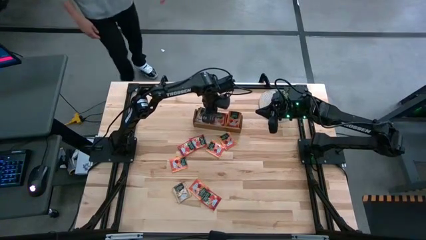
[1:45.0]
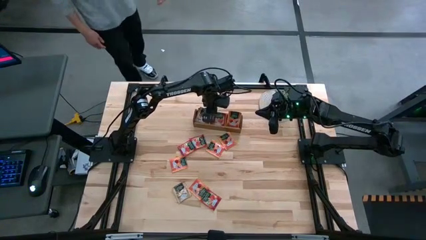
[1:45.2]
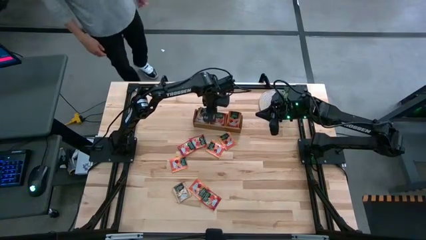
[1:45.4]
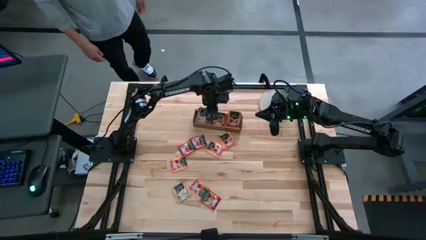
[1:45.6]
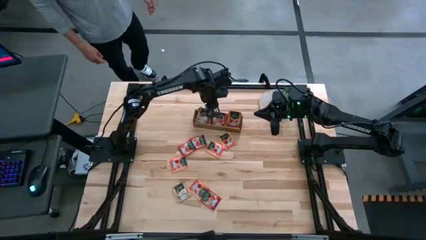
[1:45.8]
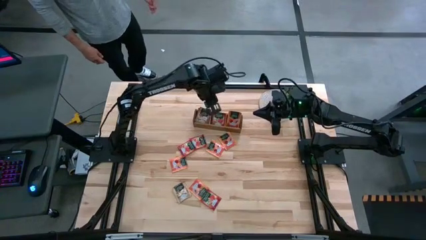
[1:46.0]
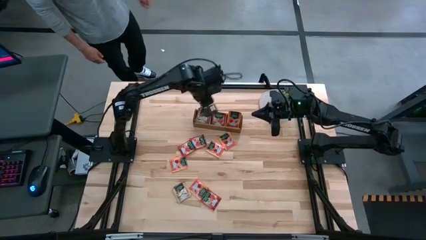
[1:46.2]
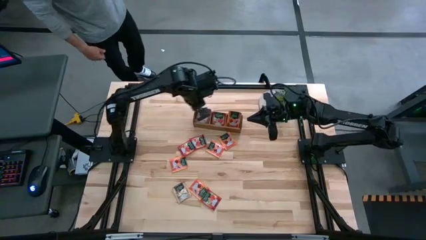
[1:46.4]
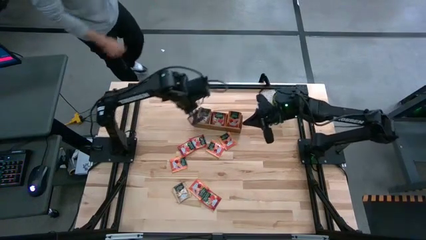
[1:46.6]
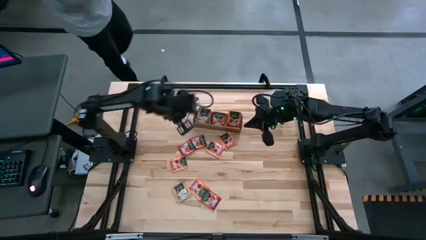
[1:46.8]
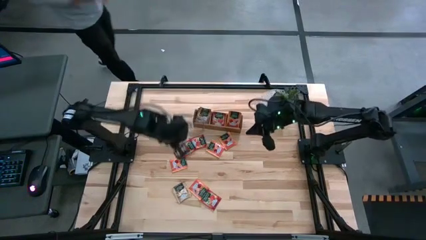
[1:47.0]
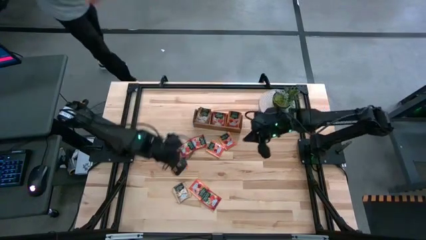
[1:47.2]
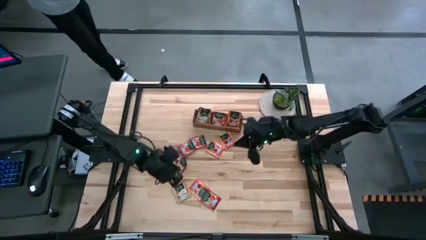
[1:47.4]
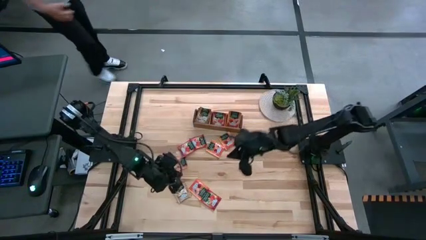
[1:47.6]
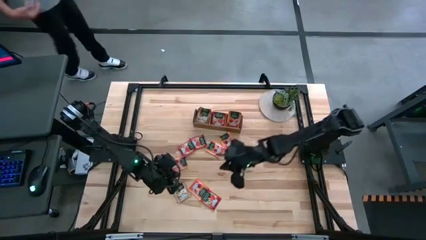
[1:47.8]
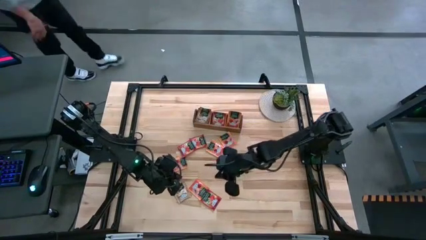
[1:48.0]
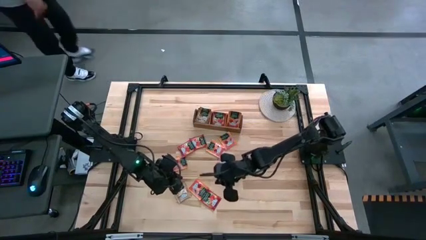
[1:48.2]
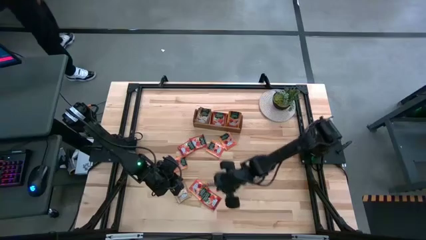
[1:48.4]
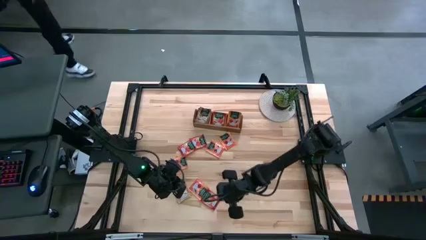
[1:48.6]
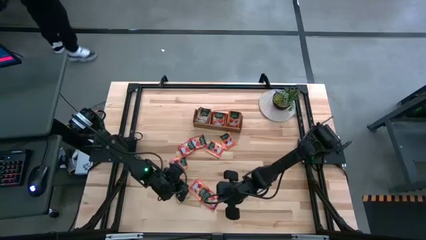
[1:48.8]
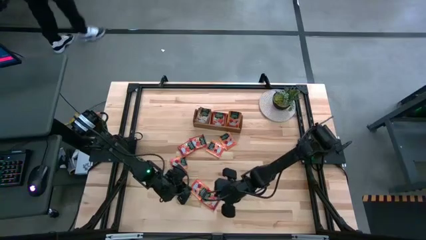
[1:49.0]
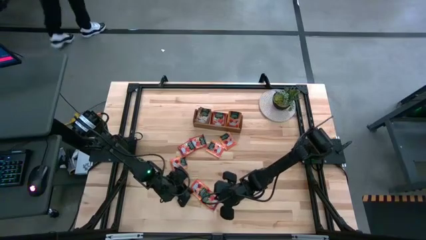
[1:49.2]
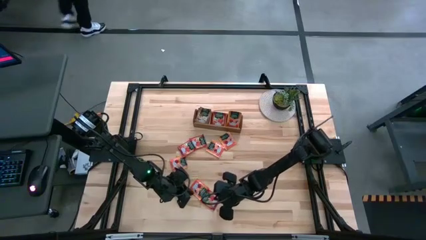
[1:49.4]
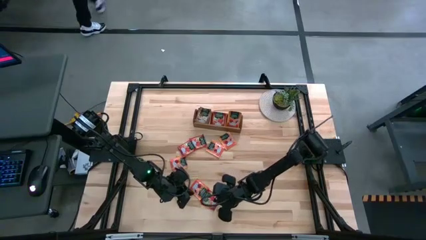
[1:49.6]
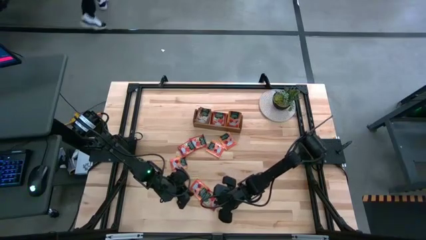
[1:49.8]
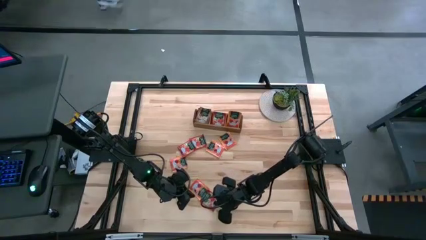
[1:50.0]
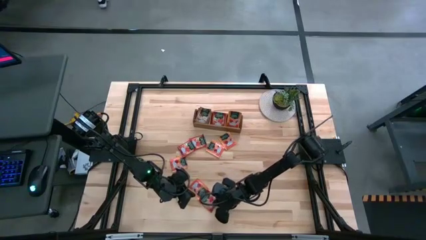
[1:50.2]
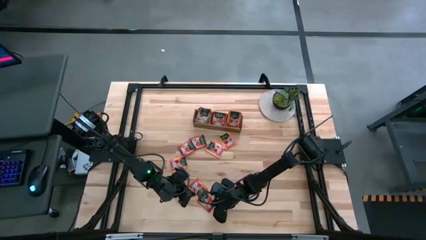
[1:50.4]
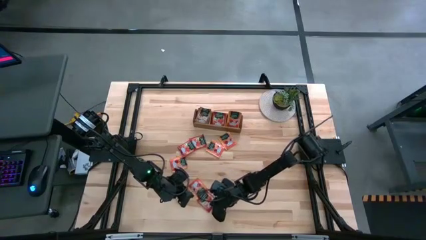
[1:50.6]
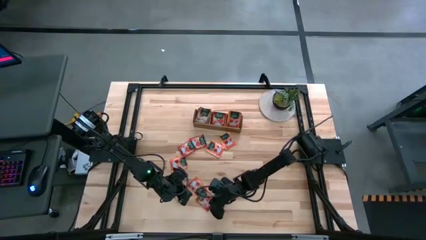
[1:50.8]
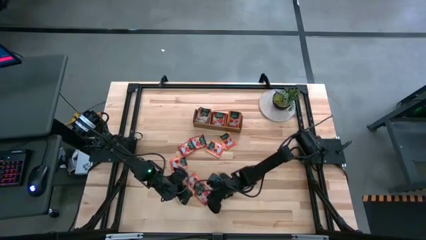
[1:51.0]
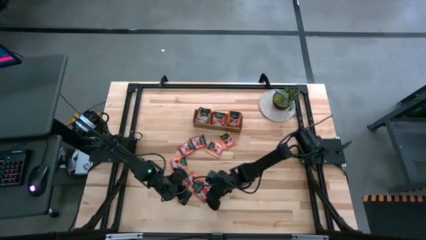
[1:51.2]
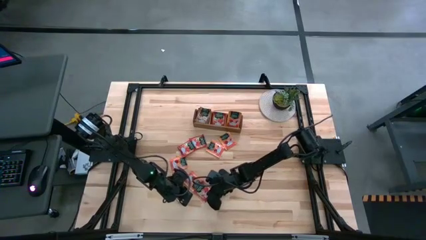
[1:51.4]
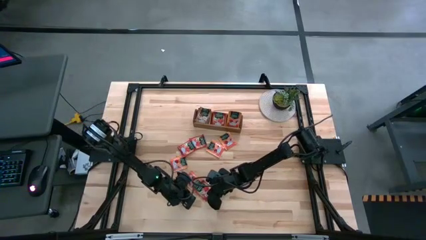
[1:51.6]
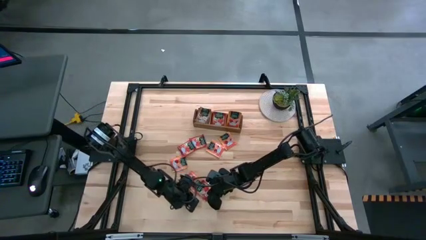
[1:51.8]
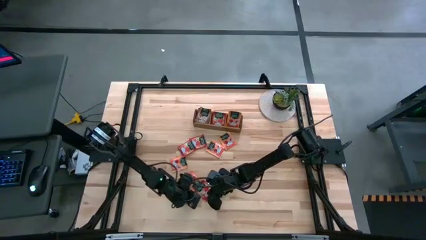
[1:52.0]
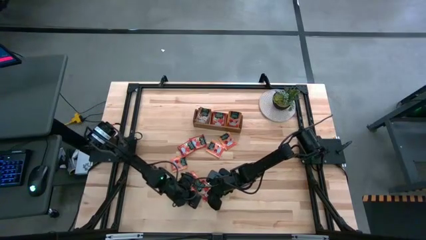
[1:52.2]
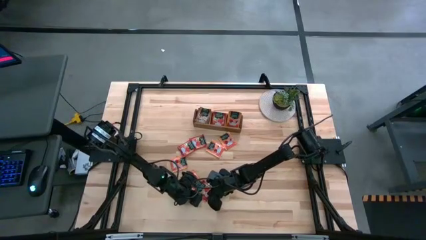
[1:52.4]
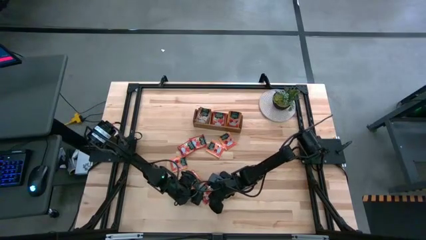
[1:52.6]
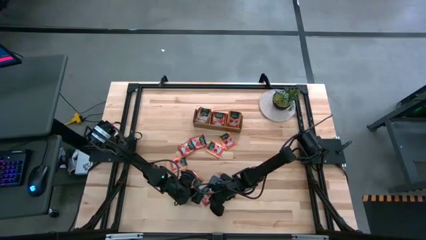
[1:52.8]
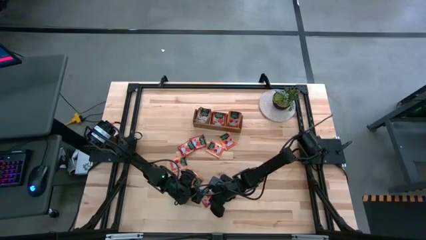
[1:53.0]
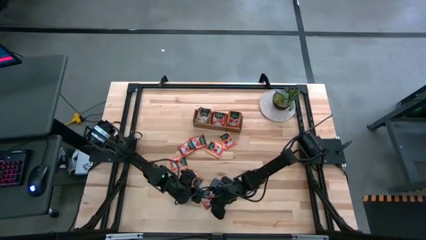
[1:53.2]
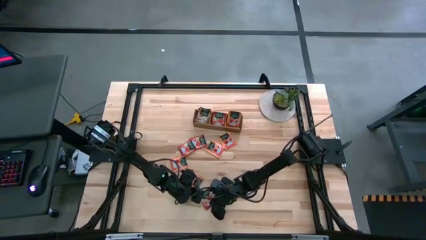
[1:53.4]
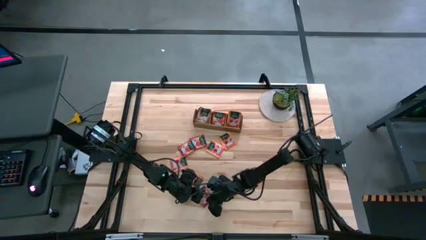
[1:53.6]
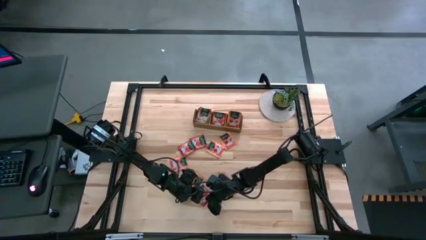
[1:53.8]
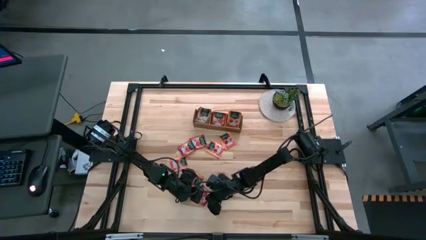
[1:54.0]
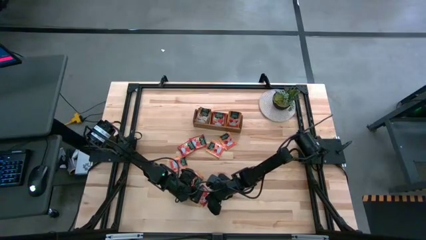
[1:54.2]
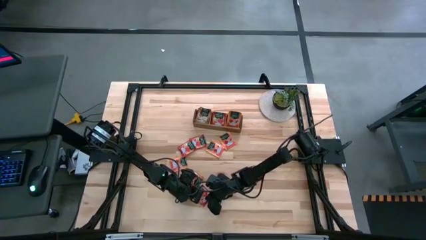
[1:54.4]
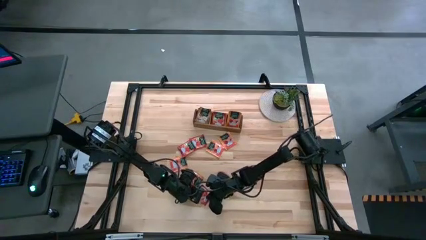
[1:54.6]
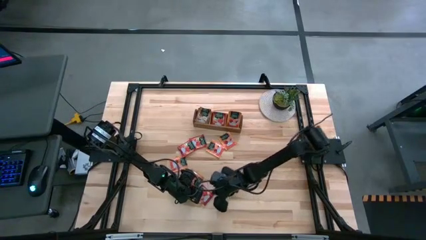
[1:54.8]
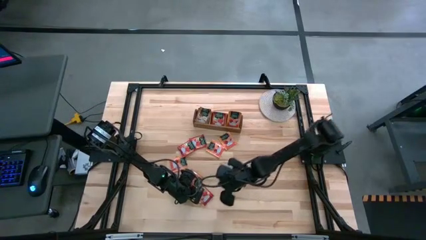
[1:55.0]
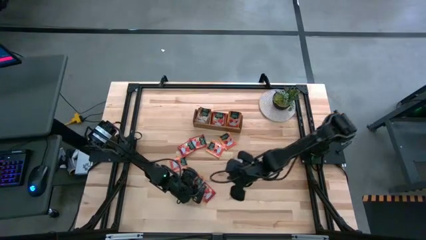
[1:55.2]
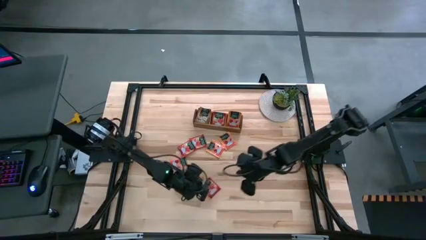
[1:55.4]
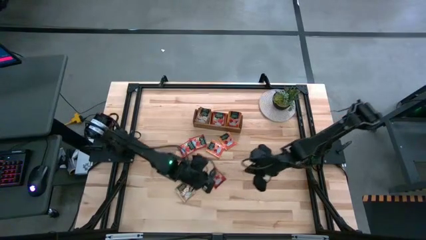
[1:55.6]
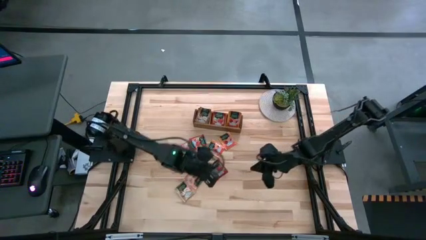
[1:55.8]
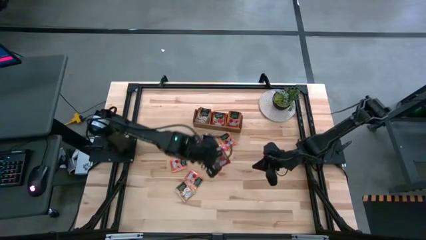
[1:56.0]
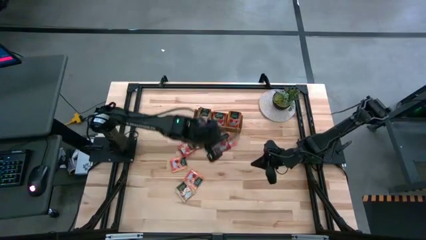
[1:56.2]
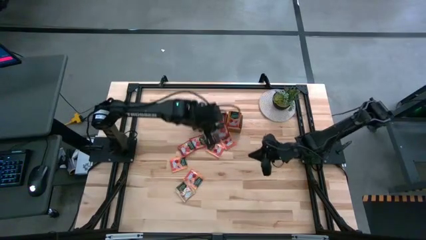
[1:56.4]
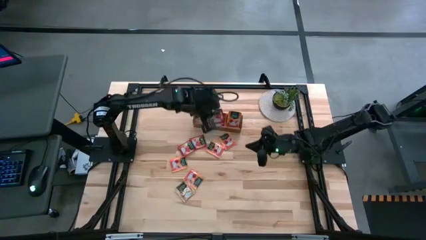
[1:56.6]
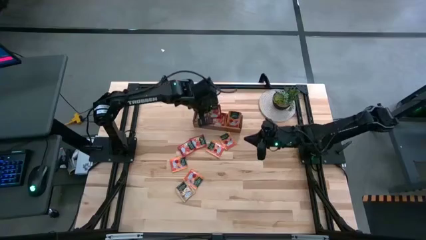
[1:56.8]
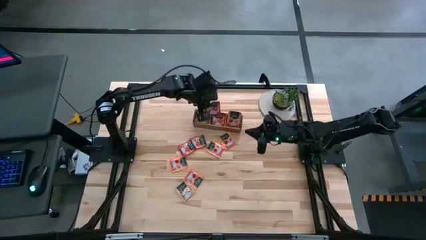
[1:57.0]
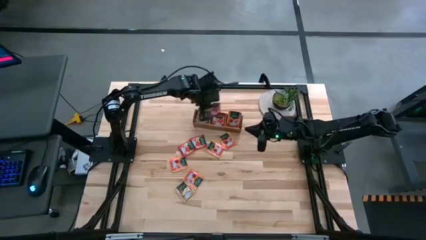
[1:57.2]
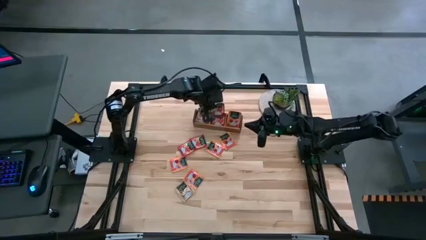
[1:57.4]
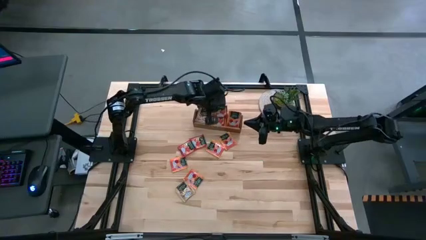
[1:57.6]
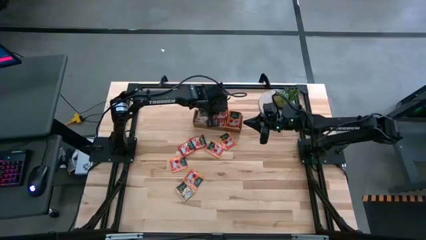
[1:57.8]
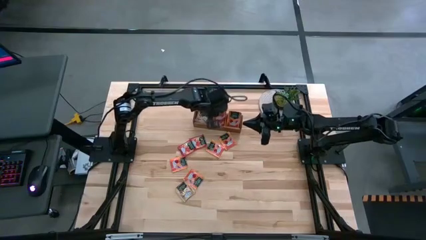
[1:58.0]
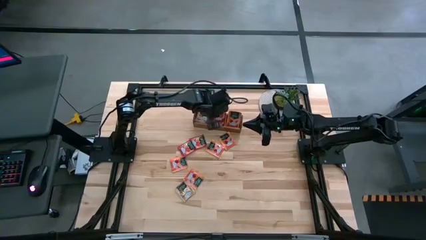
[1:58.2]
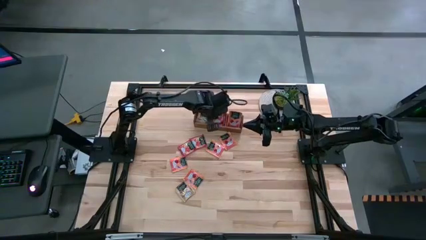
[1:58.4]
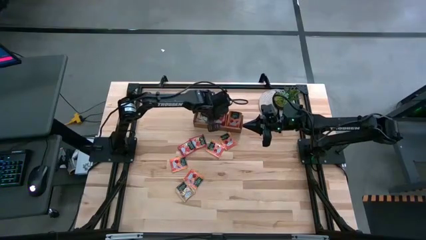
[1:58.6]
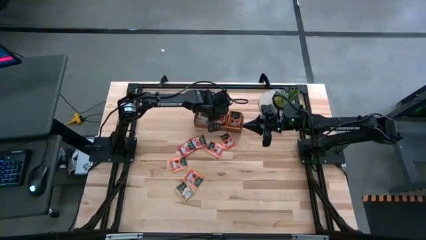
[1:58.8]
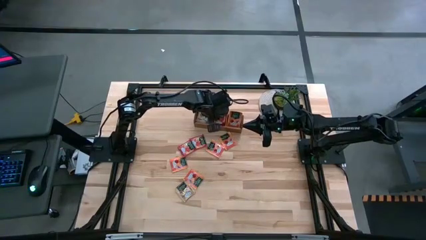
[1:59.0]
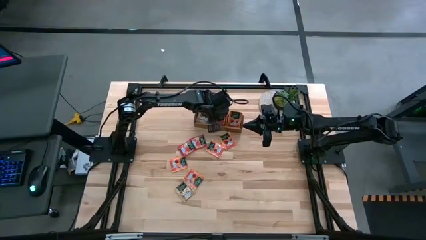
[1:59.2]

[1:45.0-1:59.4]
Task: Pick & Place Tea
Put the red tea bag into the middle section of the wooden organizer

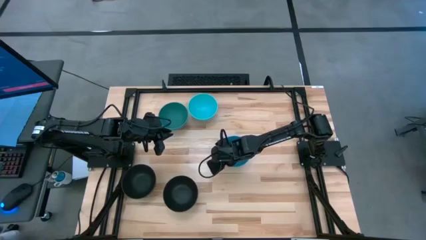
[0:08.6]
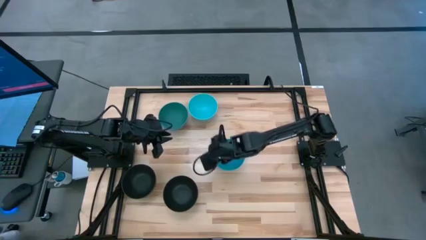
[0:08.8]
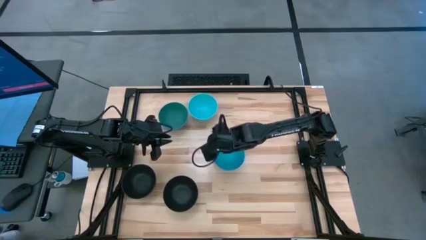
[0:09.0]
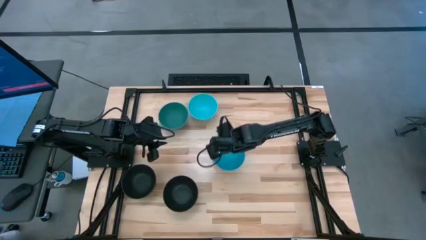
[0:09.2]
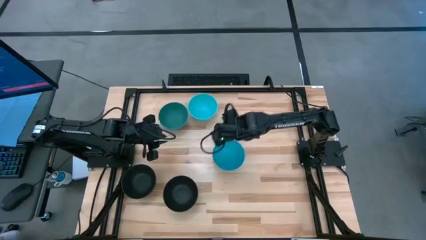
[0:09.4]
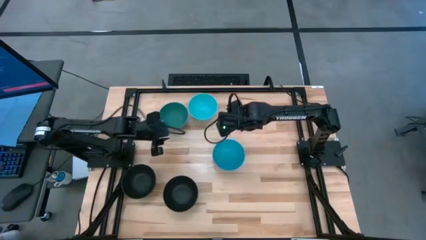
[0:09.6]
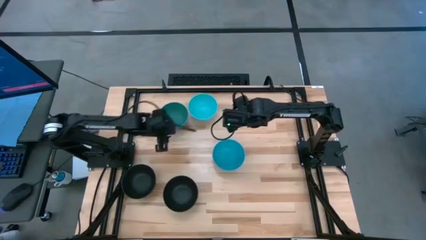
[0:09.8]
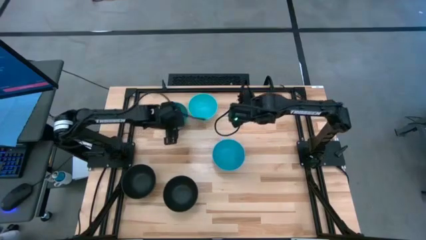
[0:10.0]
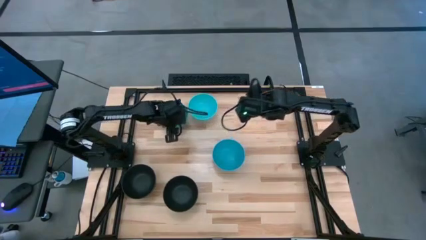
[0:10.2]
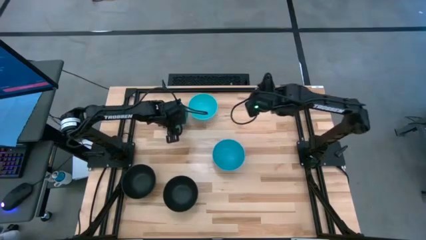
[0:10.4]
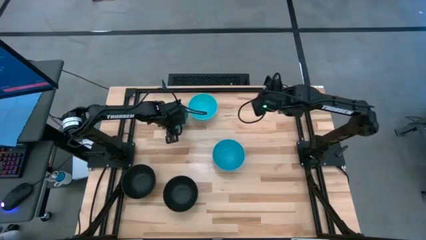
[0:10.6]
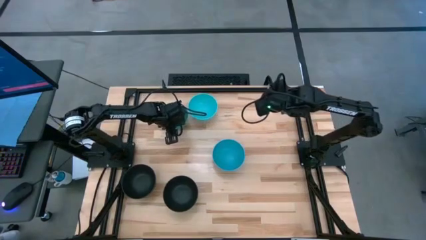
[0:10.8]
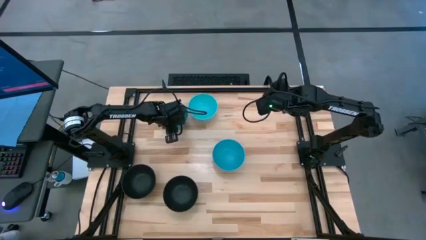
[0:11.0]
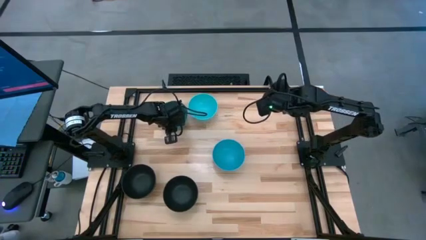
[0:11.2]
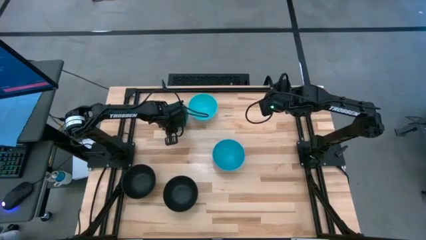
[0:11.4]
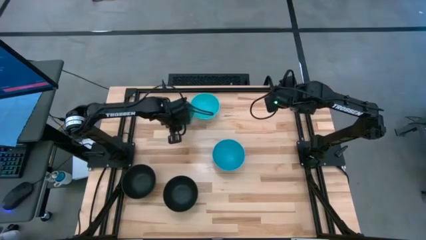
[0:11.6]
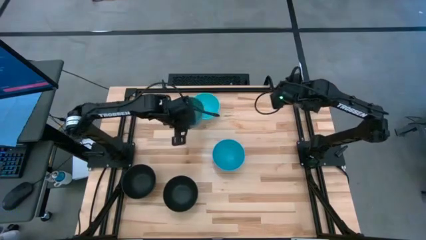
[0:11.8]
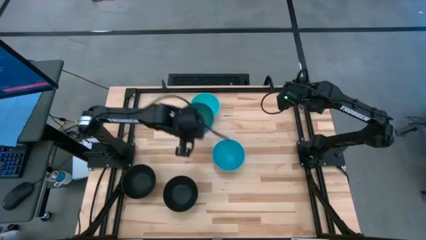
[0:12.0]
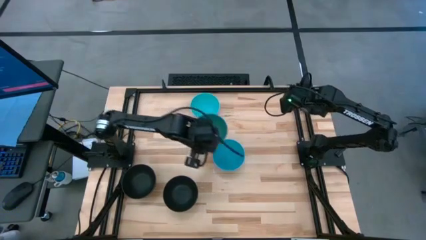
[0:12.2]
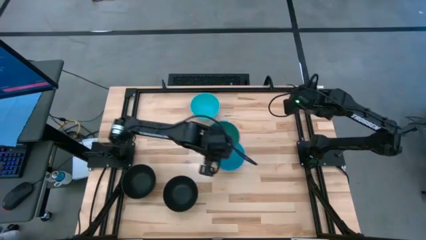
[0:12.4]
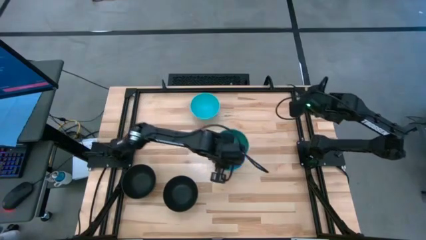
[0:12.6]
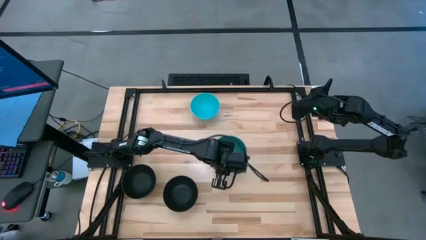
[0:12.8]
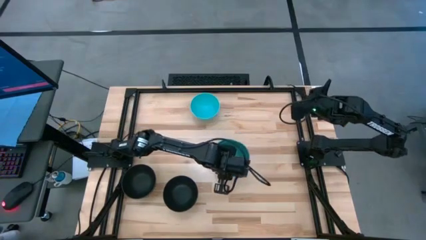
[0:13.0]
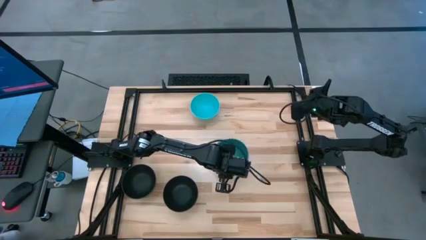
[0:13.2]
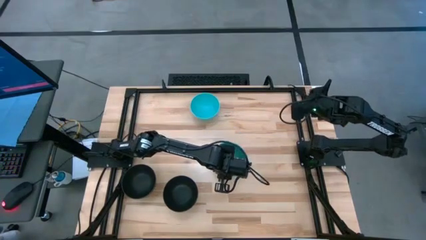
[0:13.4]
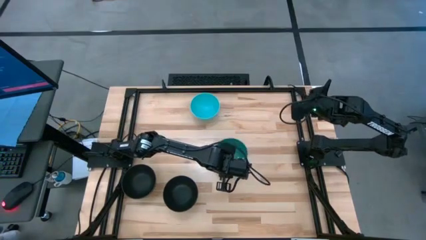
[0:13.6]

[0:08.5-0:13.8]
Task: Nest bowls inside each other
Stack the green bowl on the blue bowl
